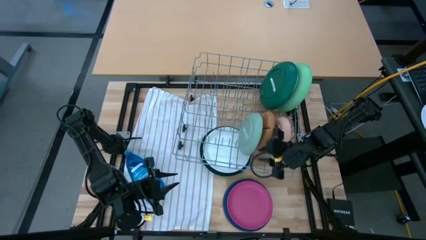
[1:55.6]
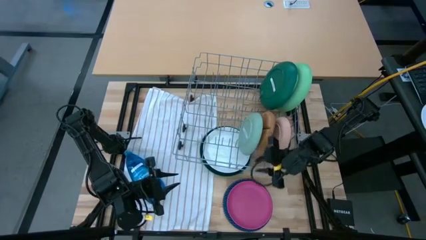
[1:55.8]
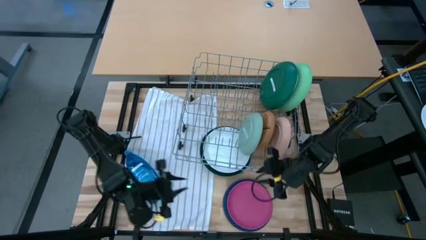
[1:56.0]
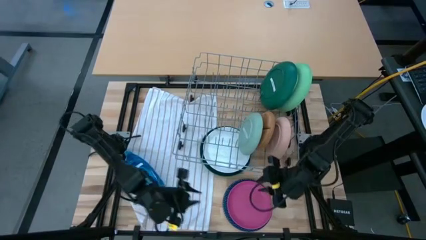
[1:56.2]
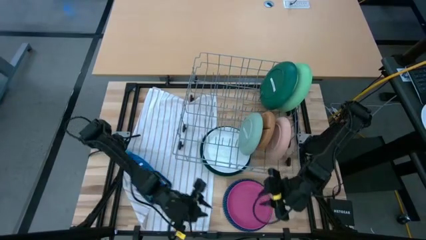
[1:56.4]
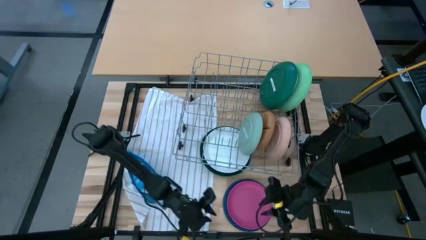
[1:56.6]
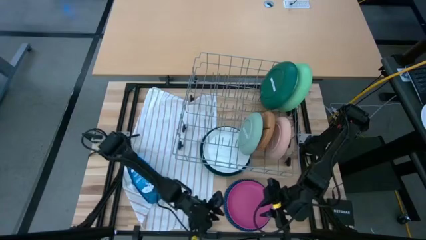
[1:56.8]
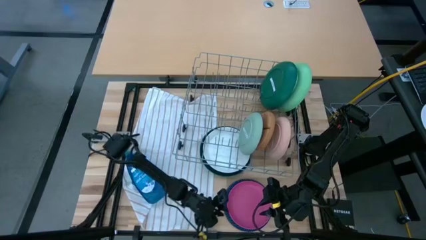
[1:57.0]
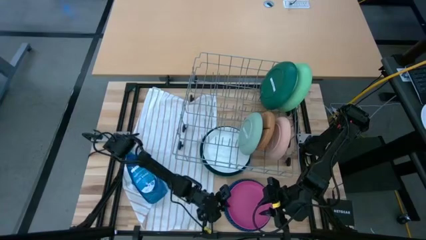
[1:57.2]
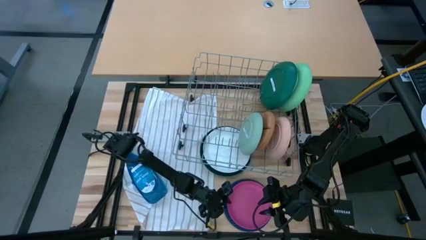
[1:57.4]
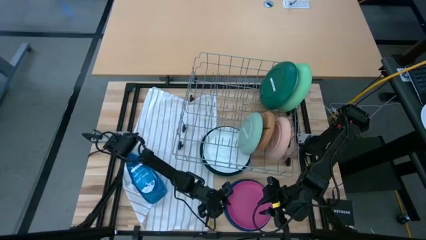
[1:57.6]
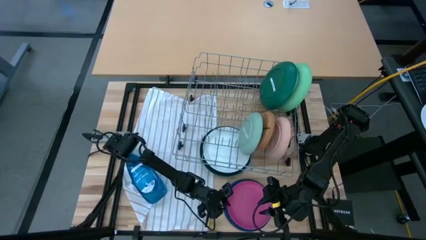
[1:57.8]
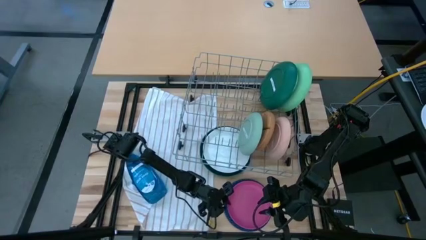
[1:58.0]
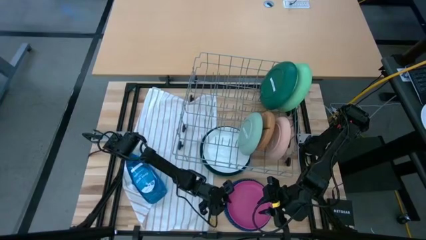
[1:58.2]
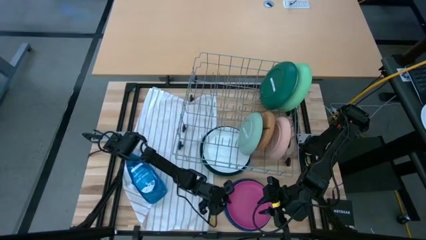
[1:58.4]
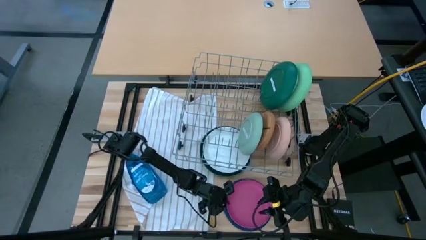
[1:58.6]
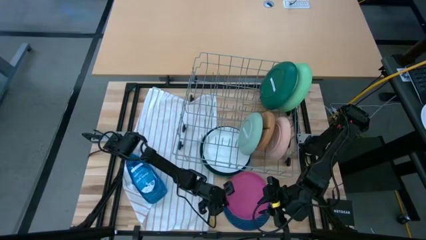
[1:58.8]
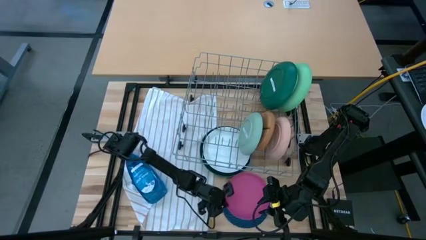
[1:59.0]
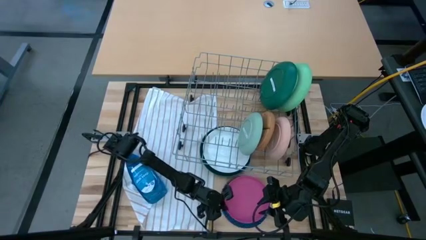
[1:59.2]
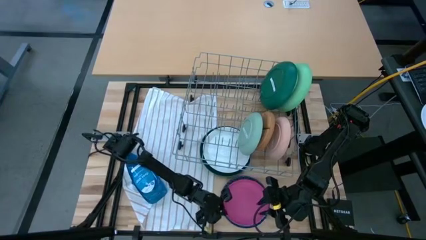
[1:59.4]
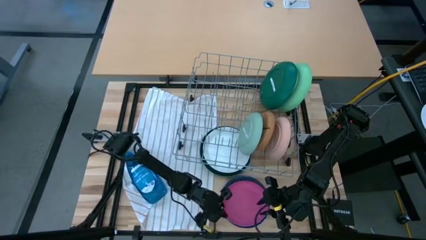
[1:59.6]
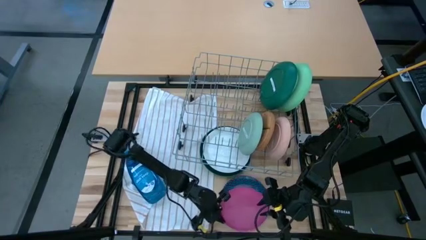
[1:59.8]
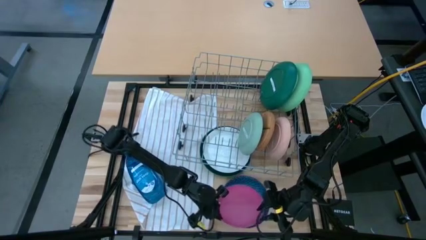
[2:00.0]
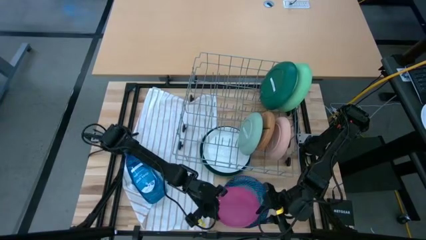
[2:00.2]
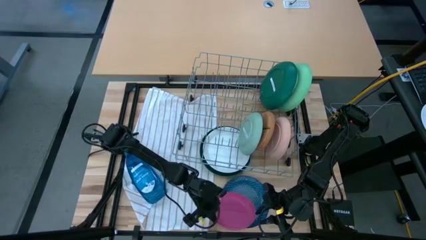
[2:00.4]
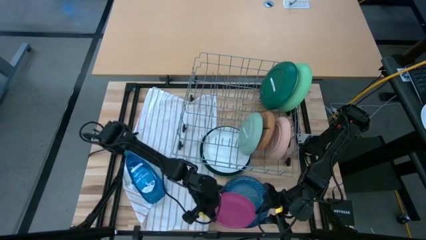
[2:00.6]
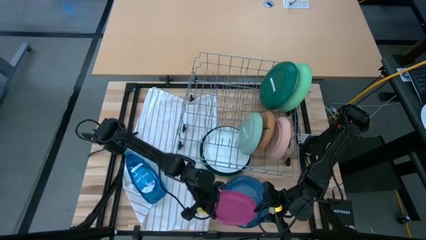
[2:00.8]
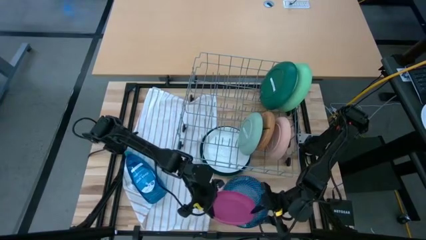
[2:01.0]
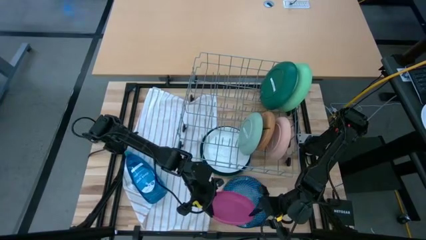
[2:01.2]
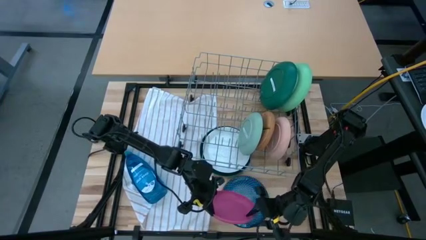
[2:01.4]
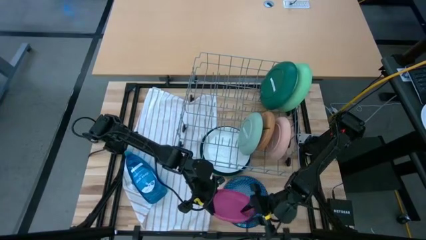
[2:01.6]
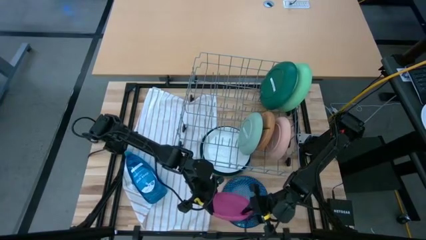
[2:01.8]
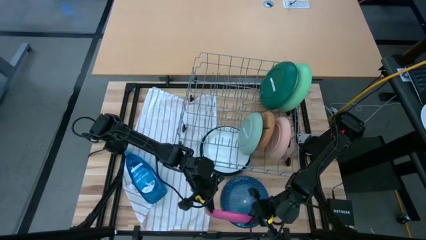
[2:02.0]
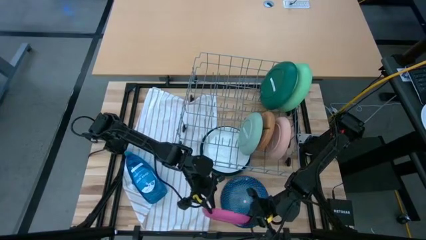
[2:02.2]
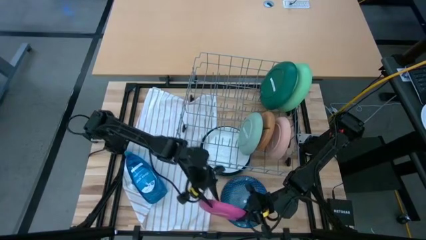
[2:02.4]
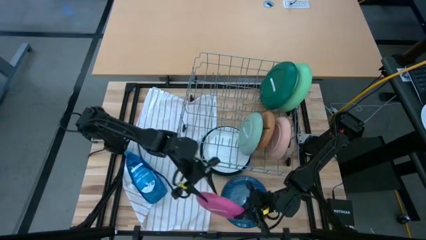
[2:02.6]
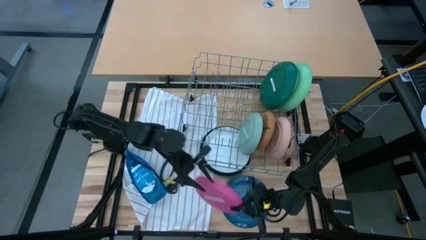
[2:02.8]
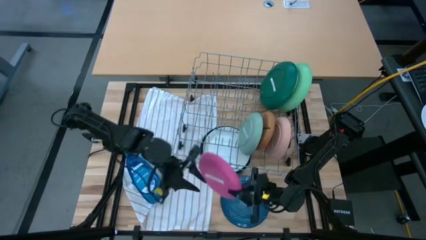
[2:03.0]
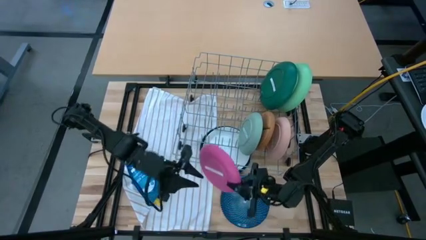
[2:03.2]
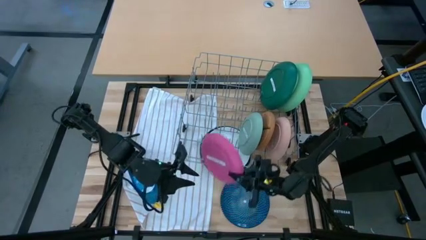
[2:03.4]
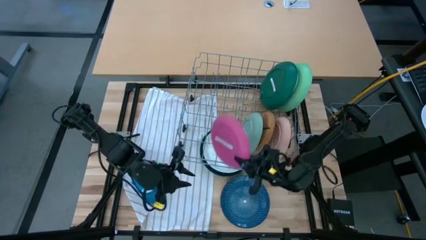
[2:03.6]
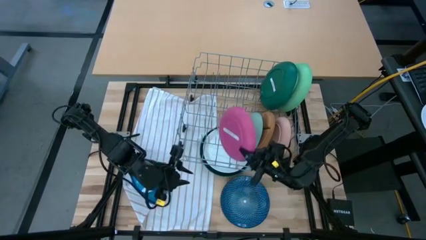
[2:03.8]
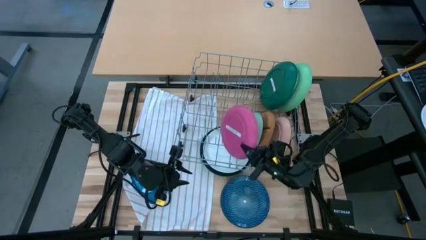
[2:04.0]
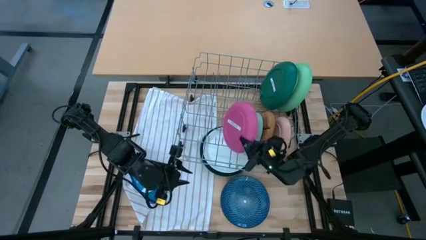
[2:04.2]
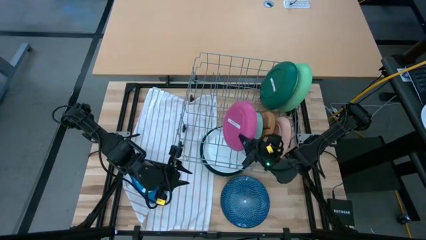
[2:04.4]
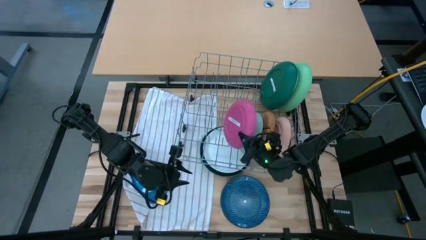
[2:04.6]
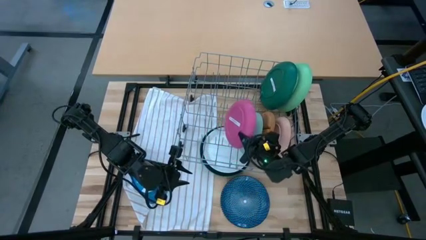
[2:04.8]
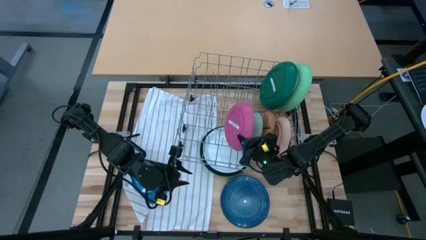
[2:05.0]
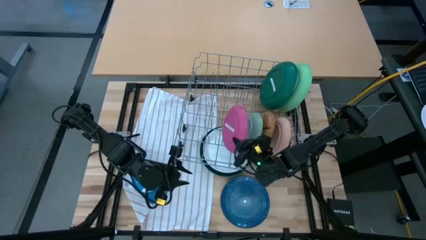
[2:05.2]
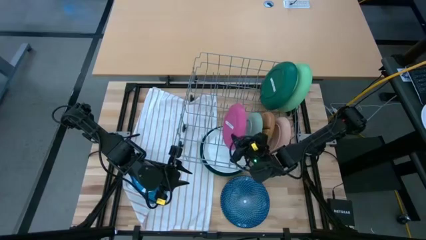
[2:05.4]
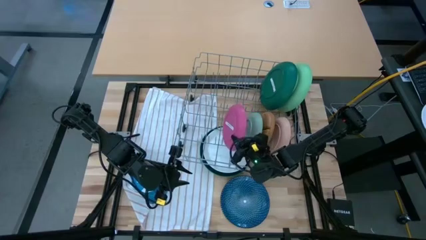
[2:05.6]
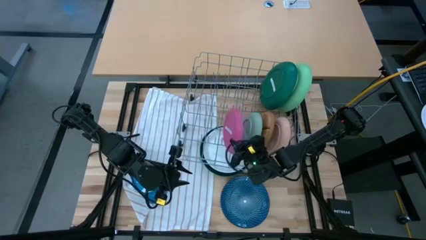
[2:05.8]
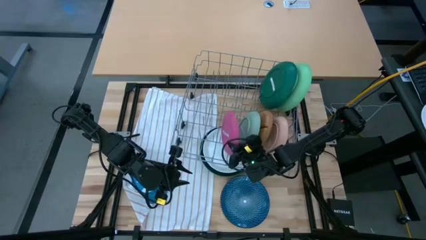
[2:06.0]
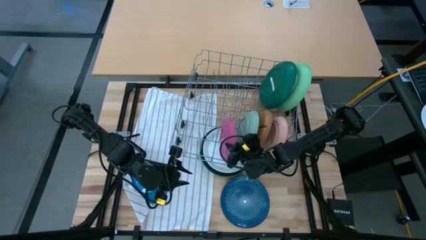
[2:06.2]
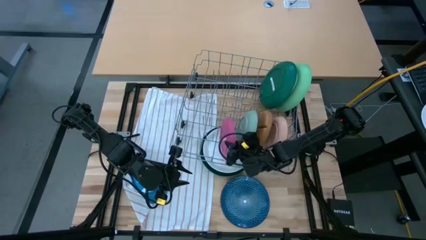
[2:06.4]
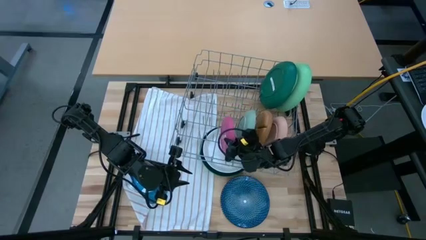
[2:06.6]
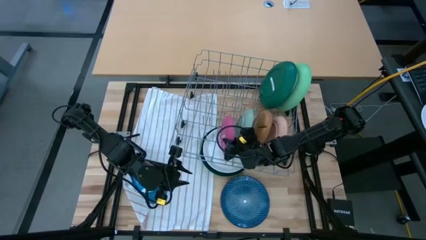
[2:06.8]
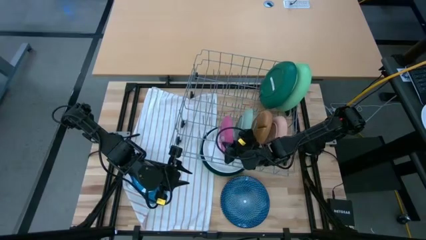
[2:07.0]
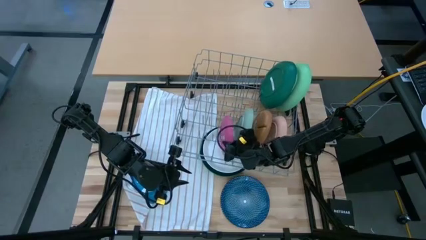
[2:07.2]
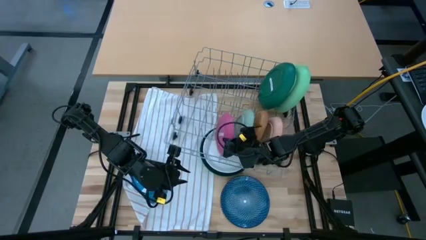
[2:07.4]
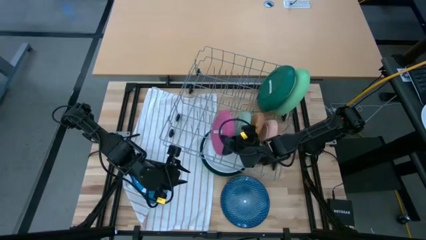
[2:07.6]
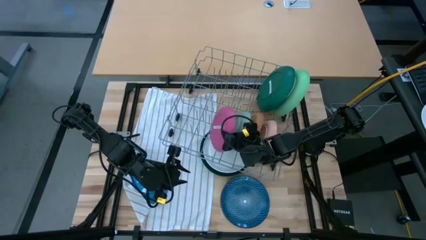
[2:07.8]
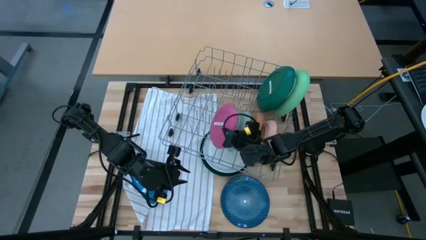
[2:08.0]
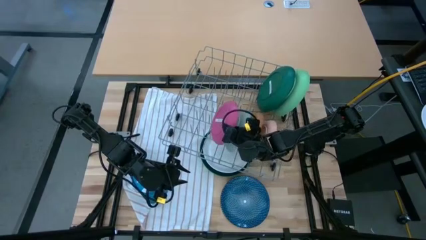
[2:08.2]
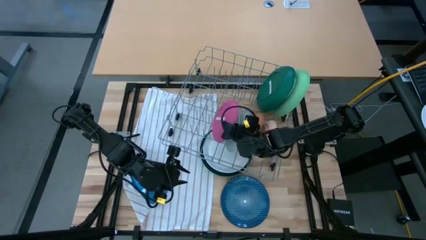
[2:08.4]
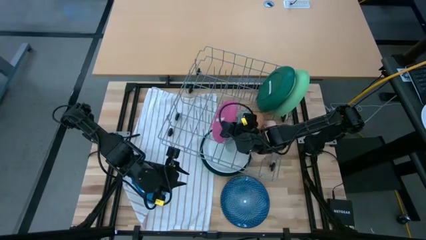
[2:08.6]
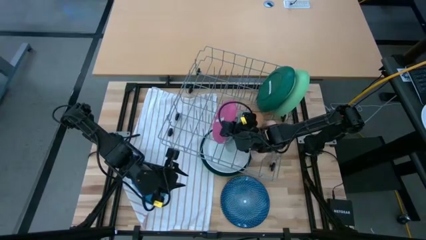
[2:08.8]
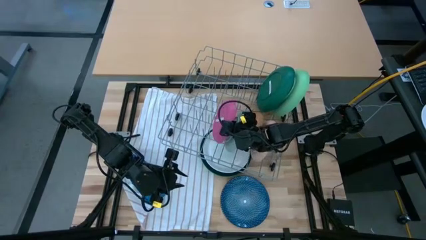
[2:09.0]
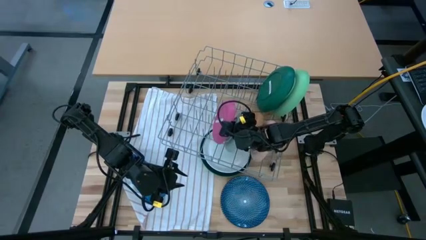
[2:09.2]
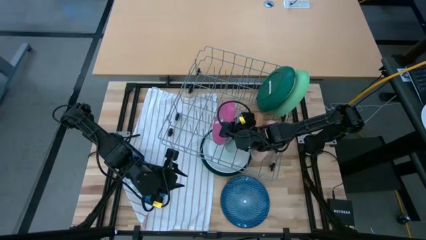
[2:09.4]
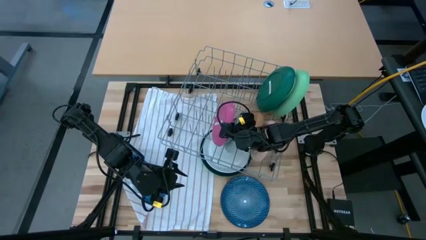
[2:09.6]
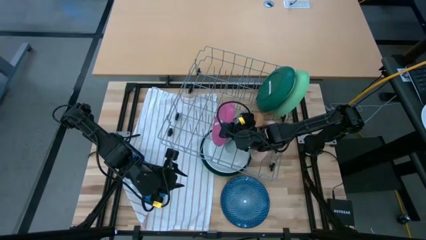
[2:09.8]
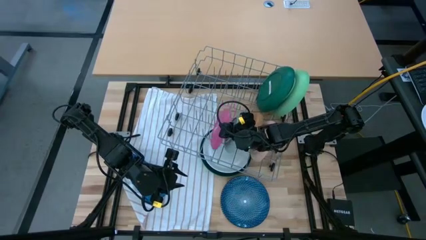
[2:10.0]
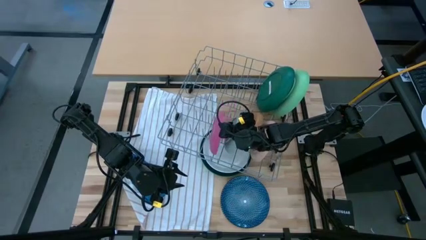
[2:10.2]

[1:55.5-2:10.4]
Task: Sort dishes
Put the pink plate in the dish rack

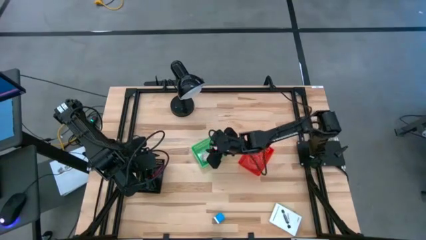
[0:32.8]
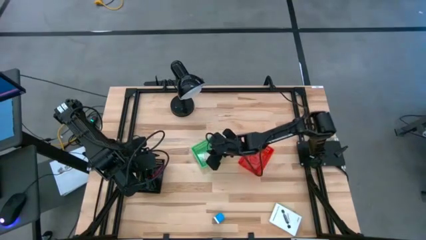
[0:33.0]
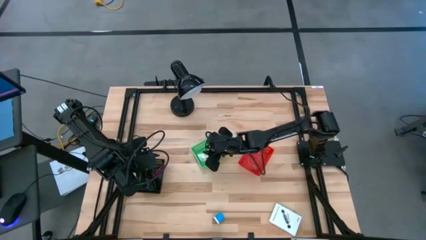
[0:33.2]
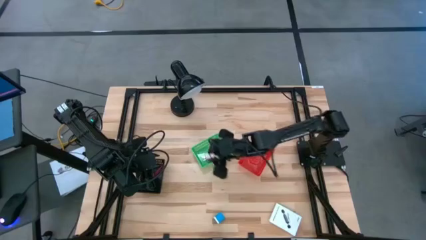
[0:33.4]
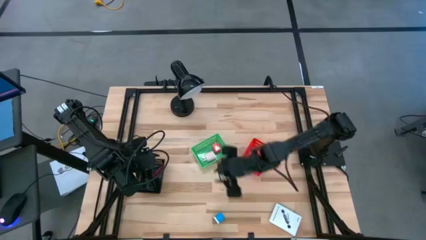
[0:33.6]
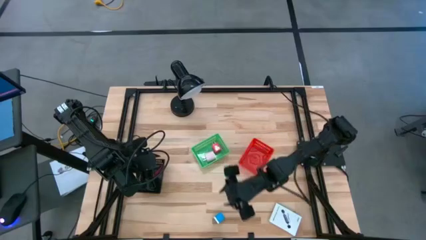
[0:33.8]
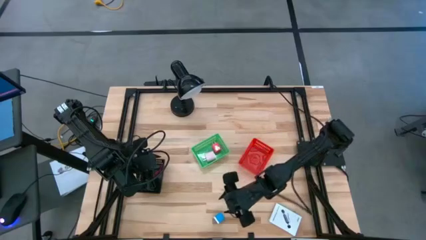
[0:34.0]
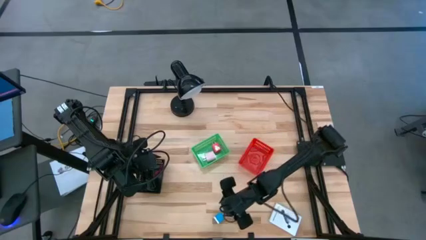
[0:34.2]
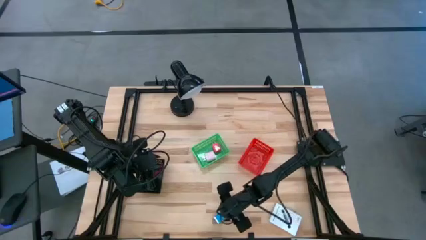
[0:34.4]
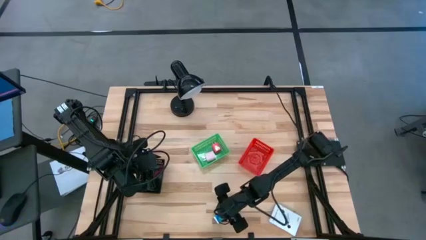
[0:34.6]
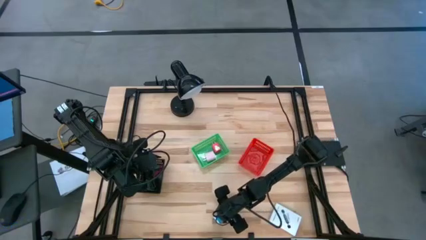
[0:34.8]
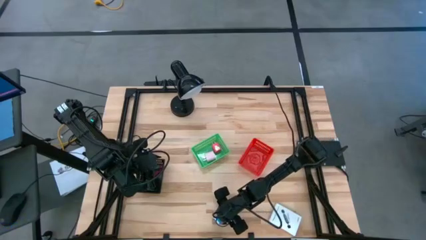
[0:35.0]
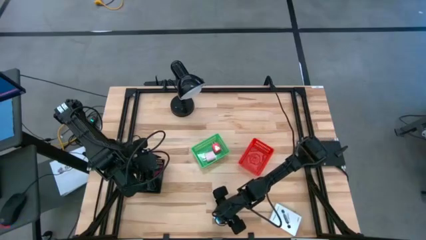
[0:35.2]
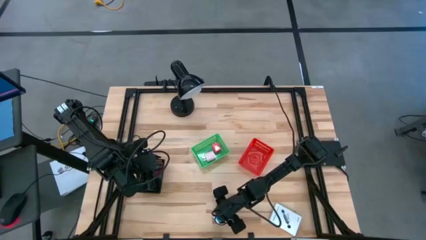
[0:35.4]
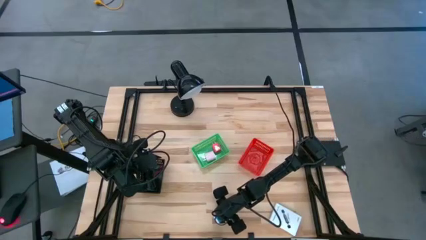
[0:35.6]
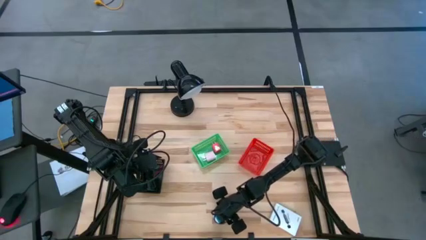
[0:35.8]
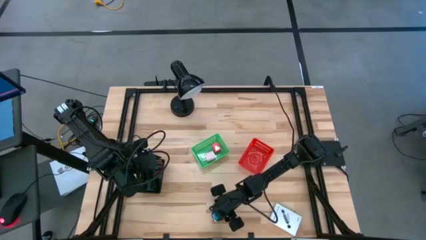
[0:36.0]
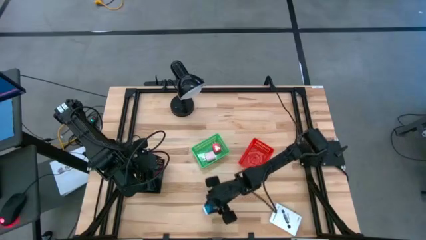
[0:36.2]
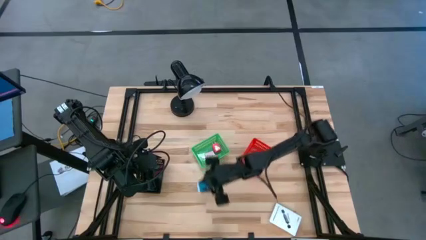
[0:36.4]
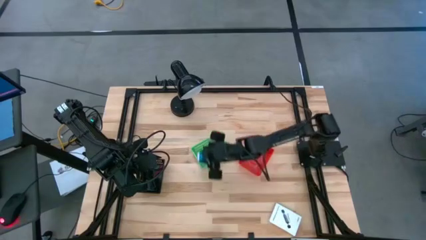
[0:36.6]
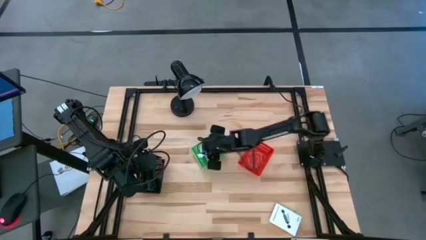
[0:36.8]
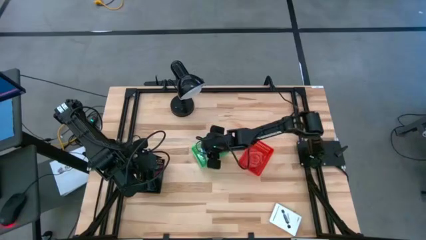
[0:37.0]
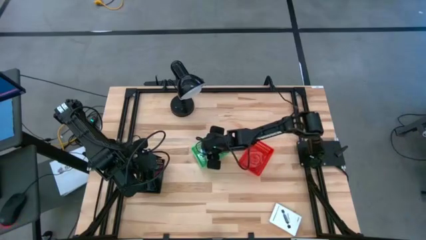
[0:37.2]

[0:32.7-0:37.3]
Task: Pick and place items into bin
Put the blue charger adapter into the green bin
